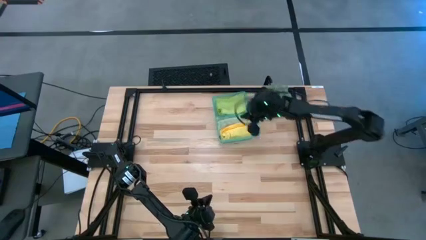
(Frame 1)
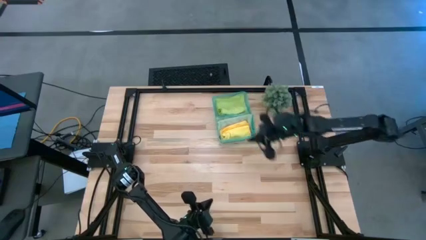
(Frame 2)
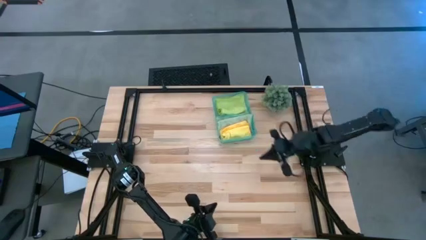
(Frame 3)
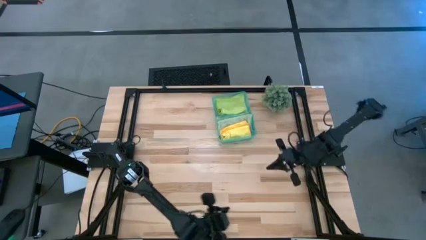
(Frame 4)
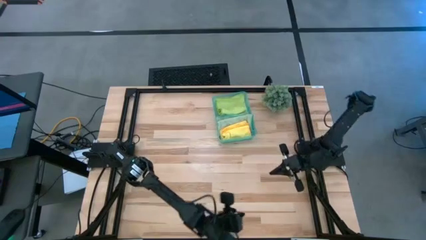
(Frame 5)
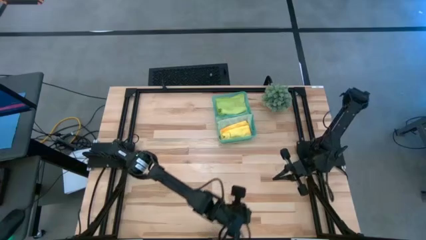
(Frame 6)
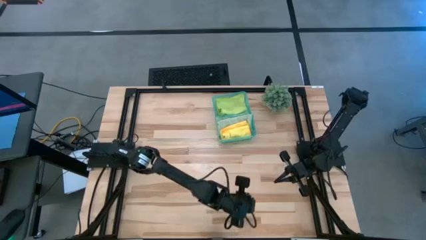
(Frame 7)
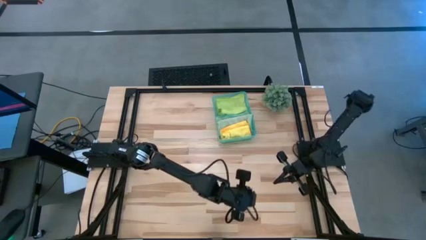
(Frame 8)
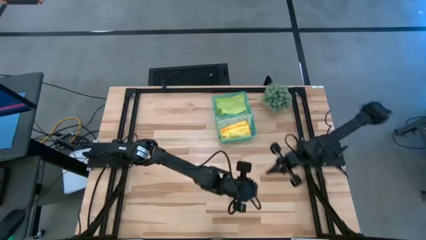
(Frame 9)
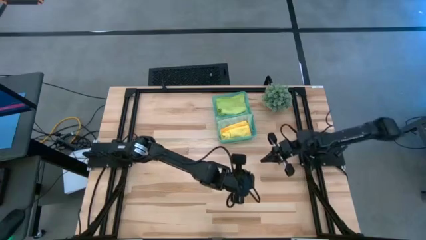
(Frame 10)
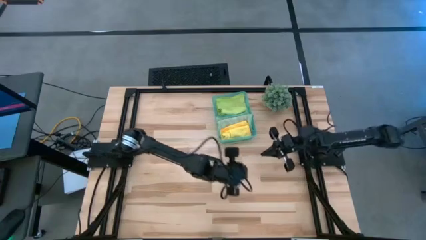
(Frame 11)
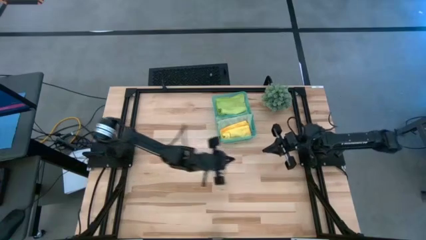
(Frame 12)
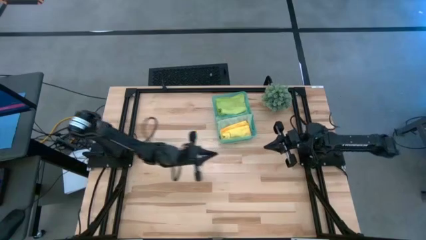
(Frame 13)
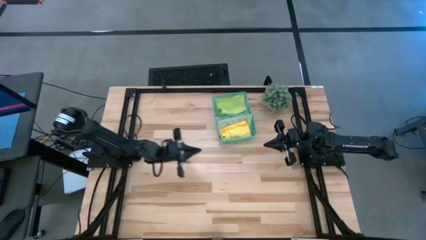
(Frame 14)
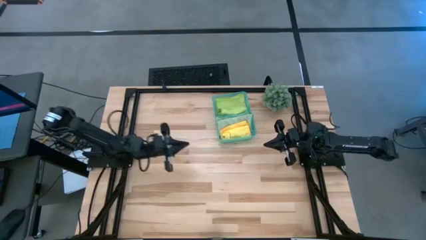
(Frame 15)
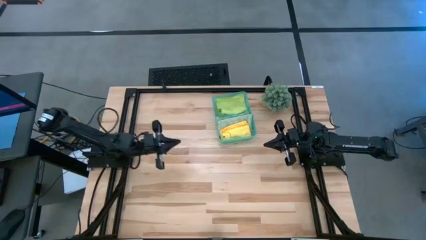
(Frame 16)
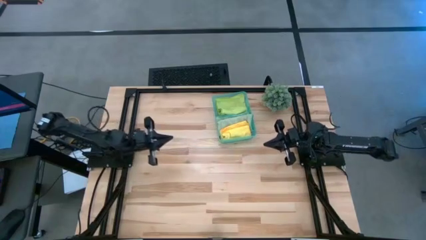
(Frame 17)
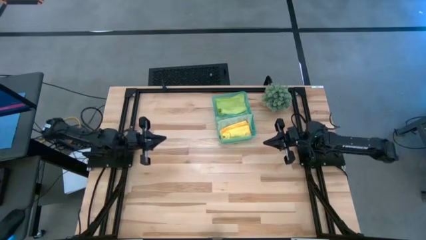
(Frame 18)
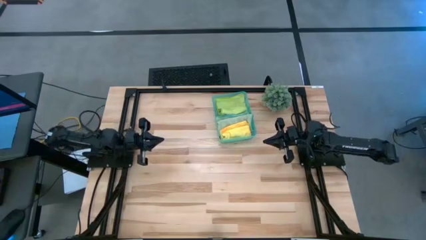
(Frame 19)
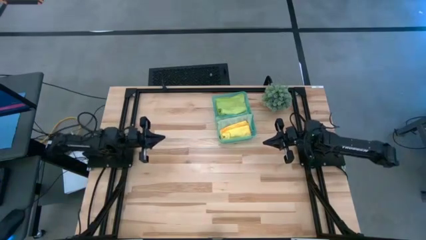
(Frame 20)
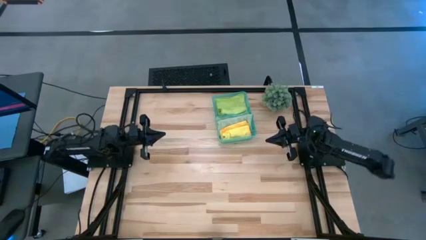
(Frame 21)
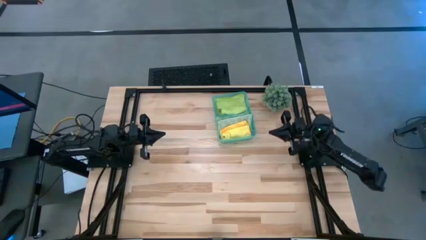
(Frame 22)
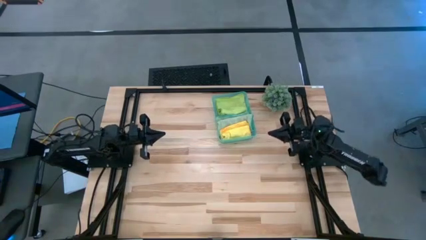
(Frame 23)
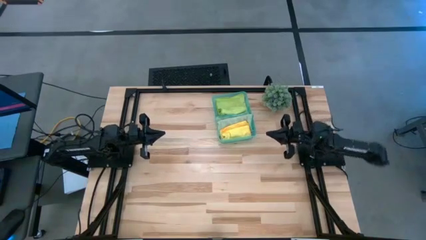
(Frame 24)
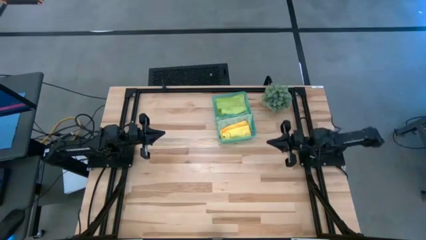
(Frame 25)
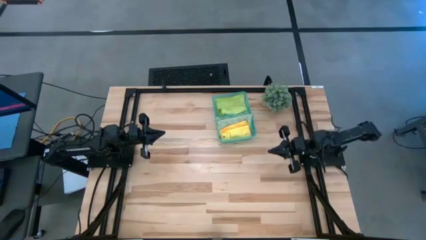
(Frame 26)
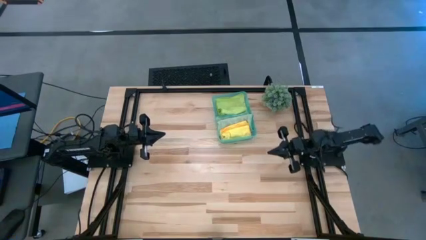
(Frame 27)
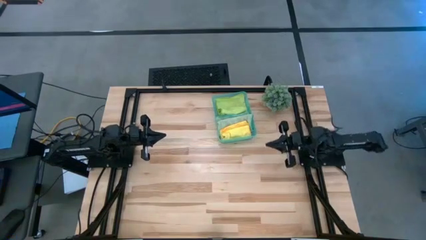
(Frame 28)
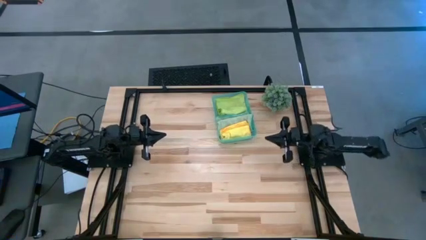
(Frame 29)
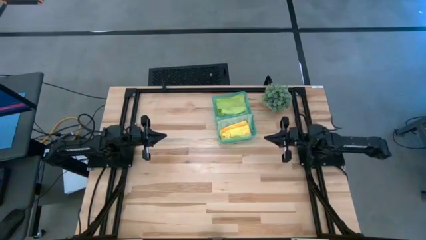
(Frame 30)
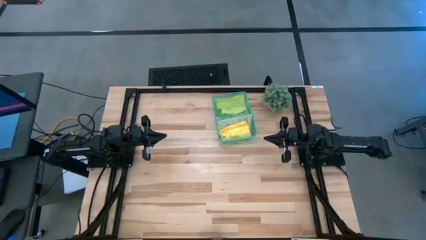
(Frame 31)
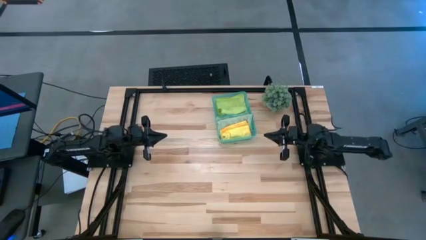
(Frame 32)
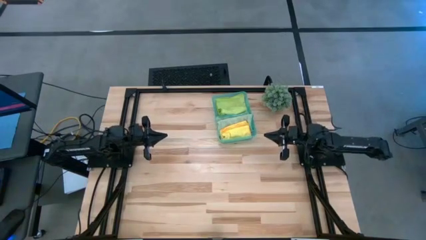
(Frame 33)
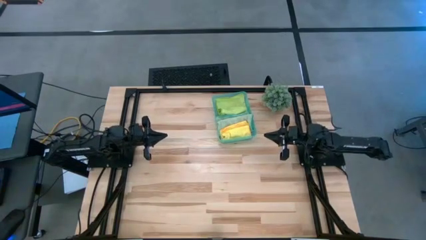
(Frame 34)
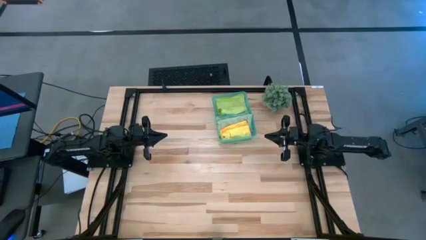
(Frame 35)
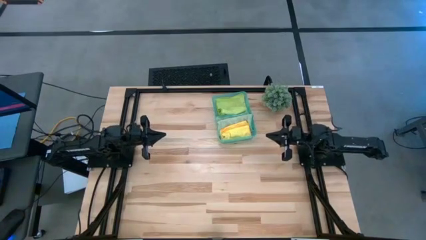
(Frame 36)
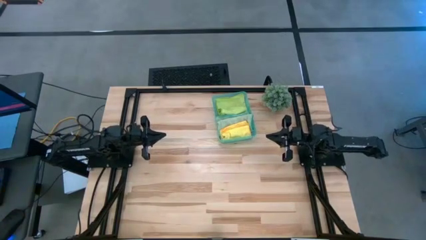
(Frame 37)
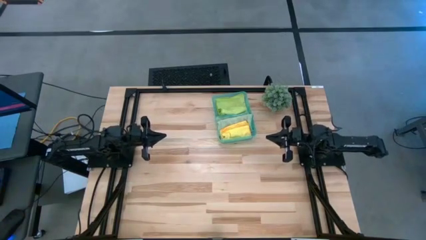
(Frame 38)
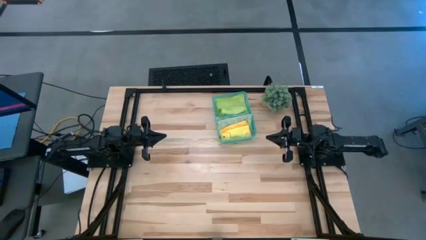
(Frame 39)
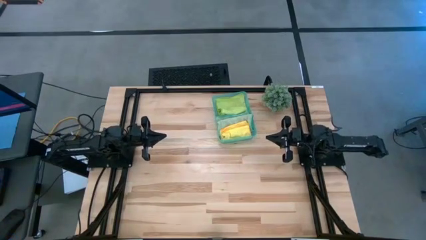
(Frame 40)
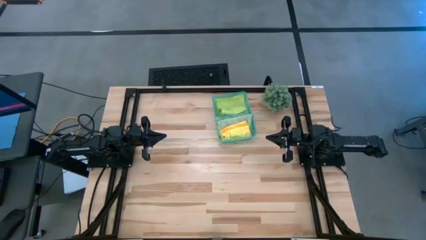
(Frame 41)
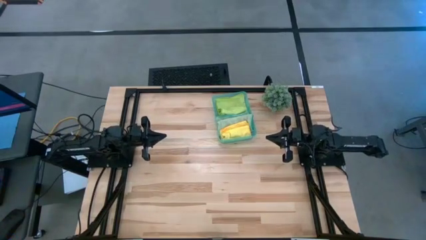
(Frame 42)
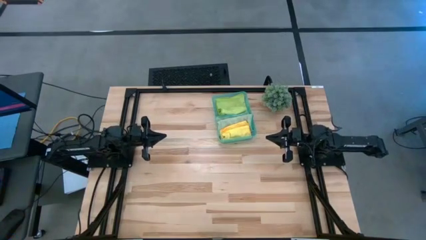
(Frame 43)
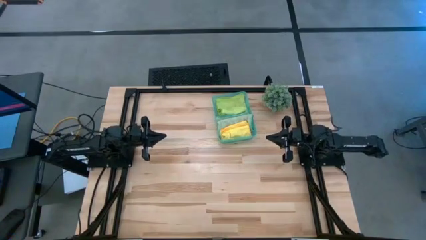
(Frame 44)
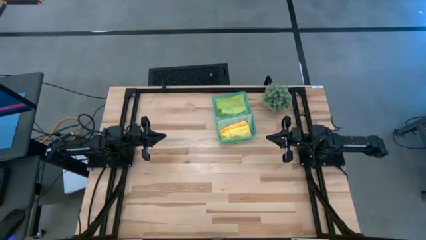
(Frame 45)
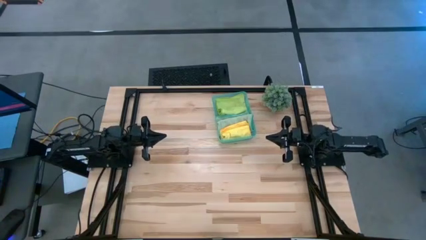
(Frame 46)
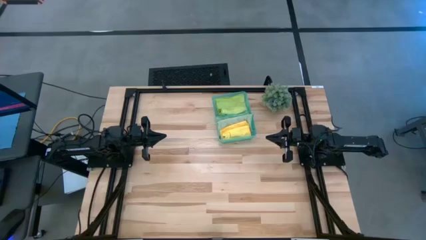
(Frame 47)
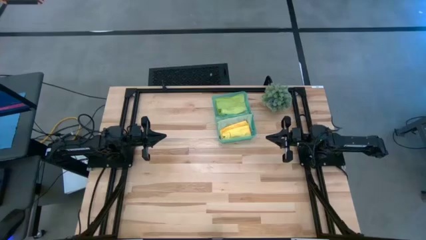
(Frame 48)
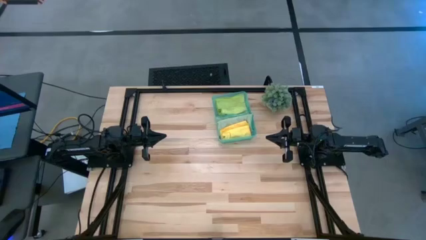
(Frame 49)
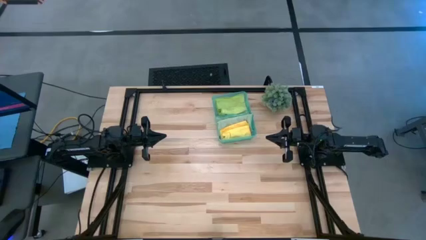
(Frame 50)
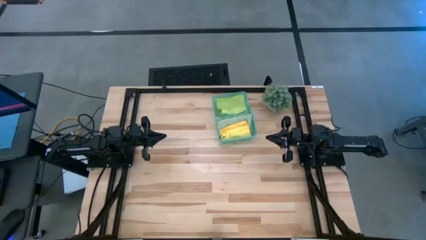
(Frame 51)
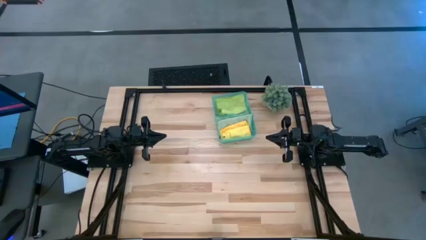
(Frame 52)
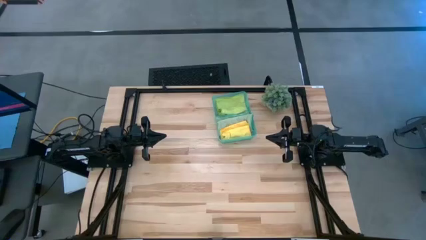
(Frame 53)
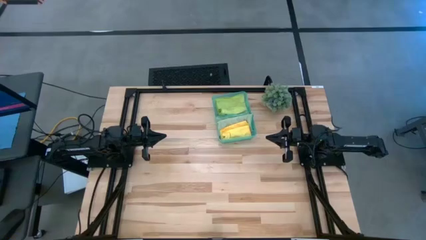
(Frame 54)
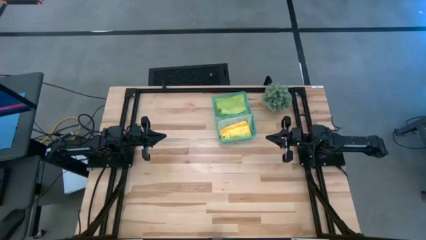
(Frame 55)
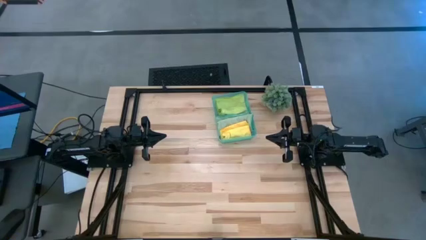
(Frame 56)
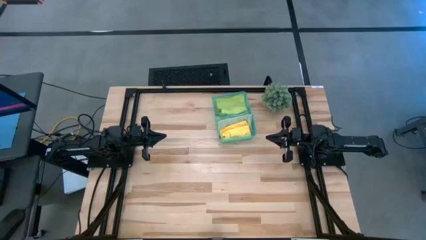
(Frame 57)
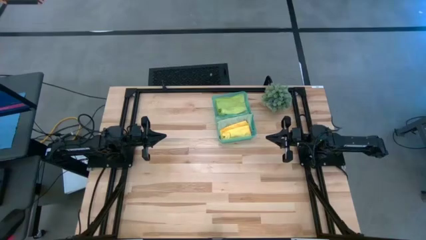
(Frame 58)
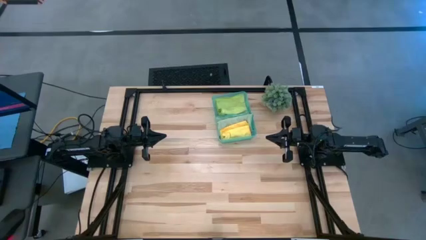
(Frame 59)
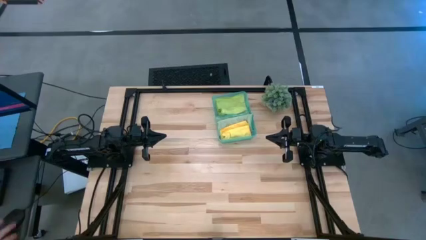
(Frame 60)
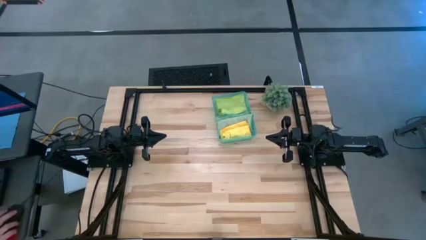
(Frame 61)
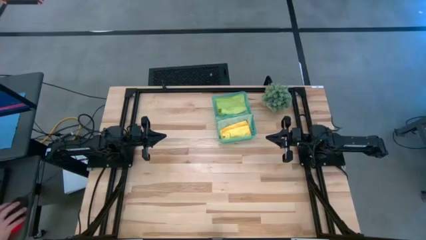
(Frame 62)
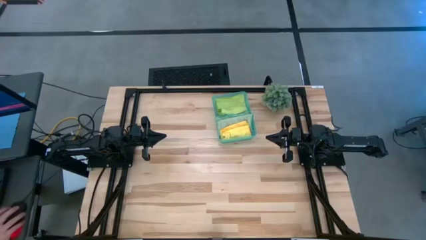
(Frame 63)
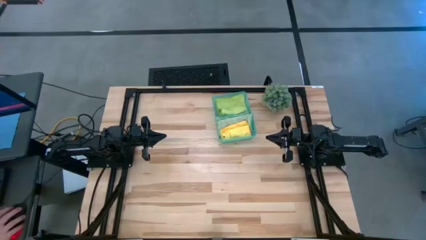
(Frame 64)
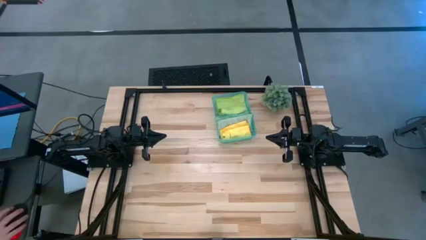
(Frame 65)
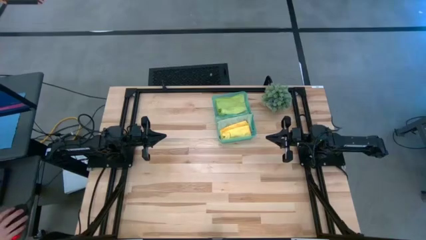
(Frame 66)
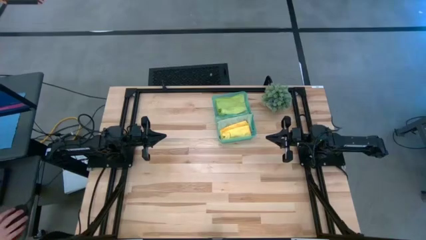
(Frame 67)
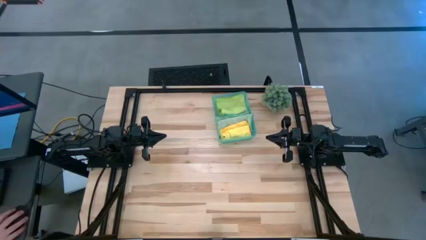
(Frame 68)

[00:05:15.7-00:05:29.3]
Task: Fold microfiber towels
Return to Home Position

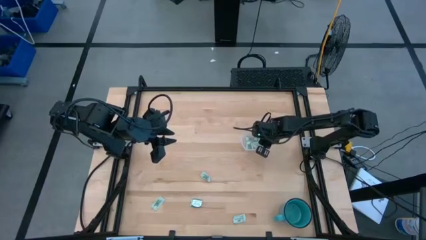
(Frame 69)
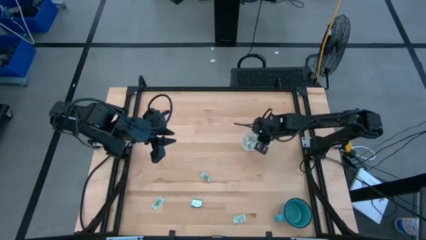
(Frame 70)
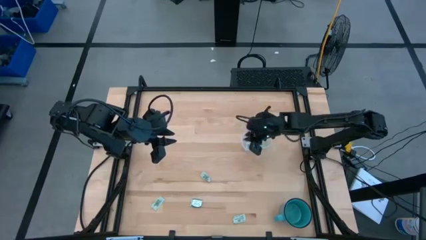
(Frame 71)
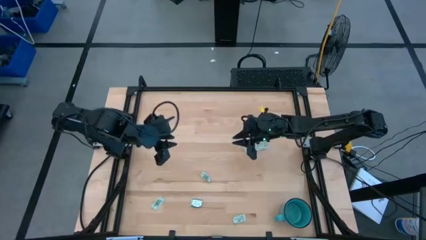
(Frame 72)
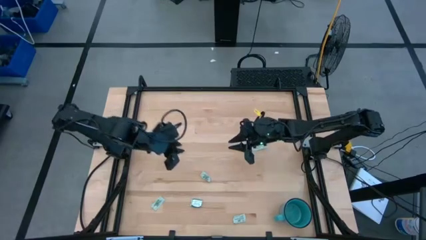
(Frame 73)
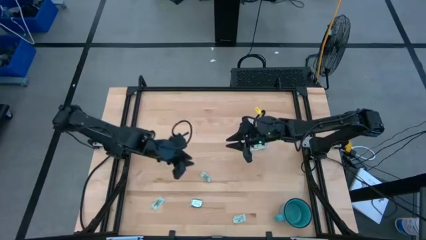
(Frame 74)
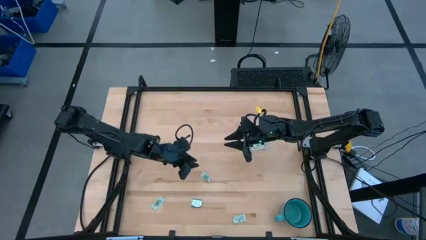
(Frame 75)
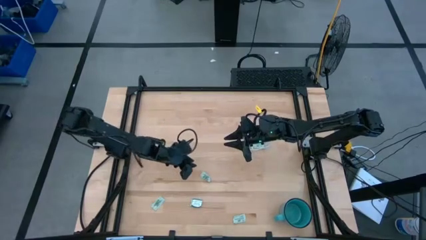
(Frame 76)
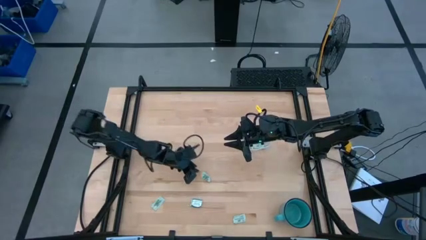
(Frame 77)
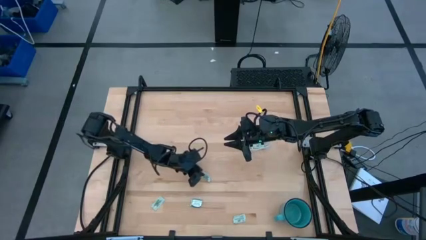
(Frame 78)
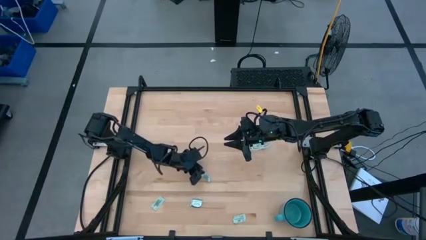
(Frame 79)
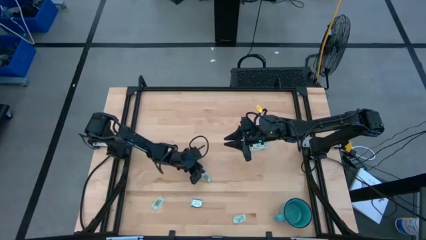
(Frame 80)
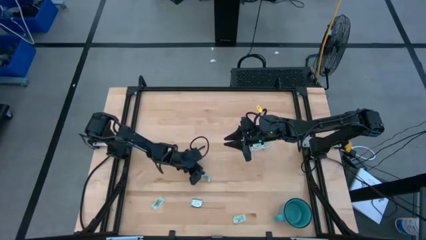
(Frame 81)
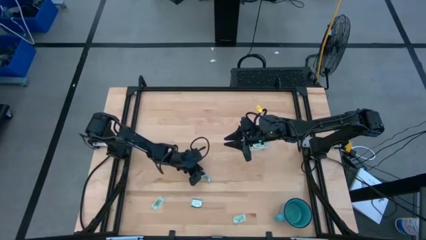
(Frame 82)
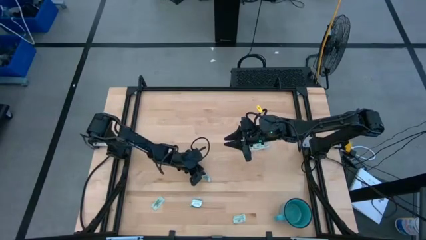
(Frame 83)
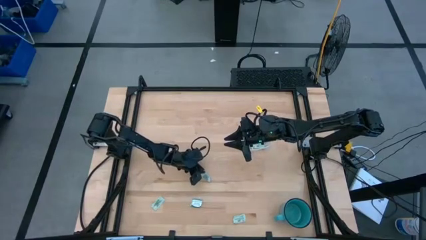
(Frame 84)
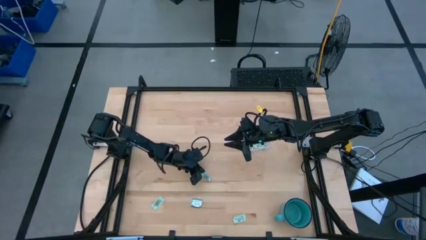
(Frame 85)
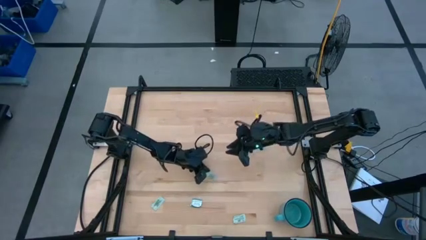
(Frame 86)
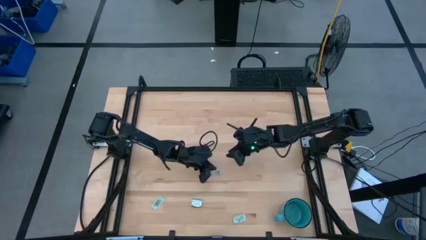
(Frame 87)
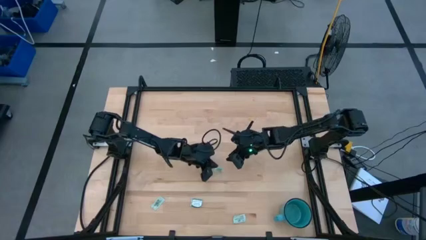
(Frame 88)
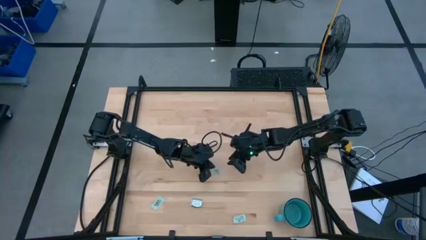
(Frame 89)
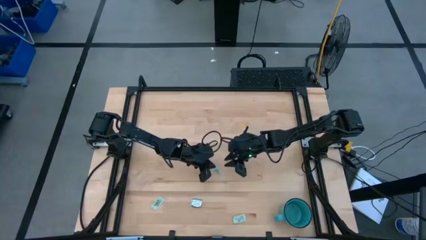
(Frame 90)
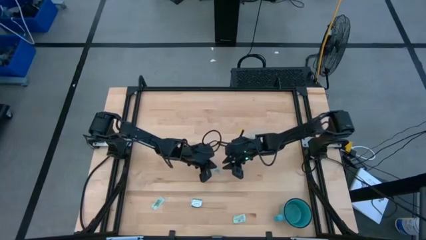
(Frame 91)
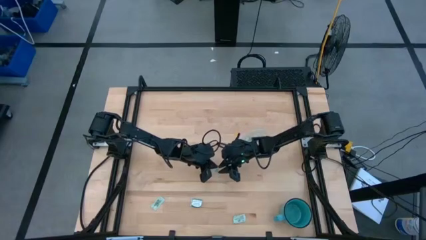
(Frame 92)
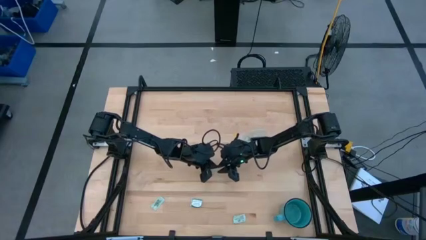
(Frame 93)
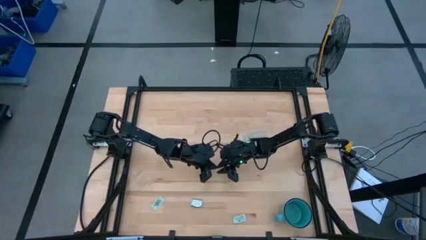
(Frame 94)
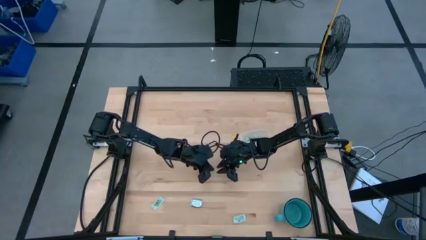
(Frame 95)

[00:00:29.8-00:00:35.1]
Task: Pick and place Stevia / Truvia into bins
Put the green stevia packet into the transparent bin
